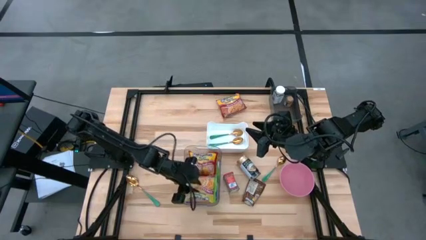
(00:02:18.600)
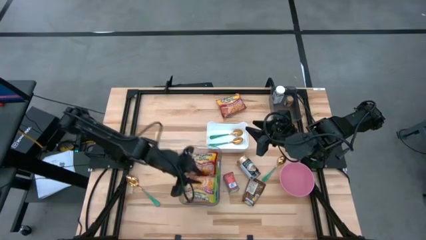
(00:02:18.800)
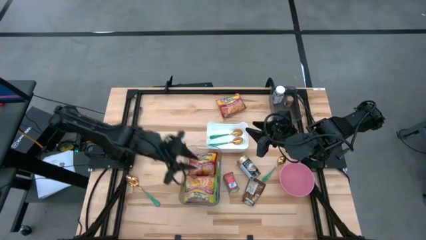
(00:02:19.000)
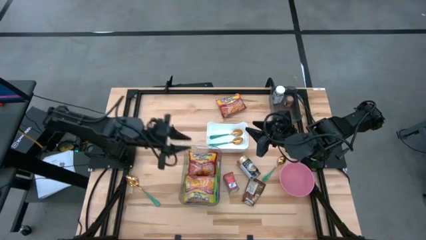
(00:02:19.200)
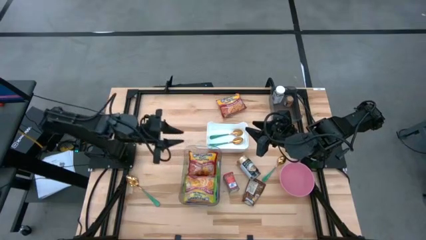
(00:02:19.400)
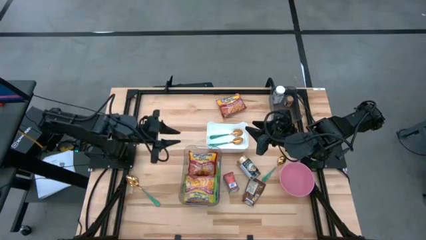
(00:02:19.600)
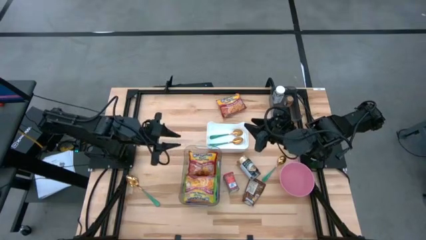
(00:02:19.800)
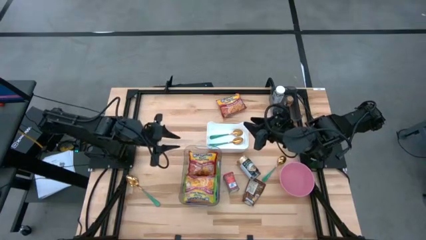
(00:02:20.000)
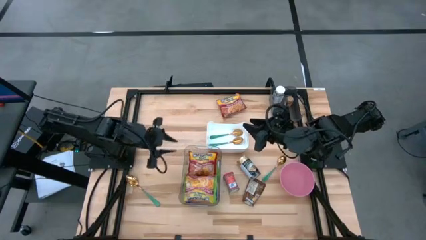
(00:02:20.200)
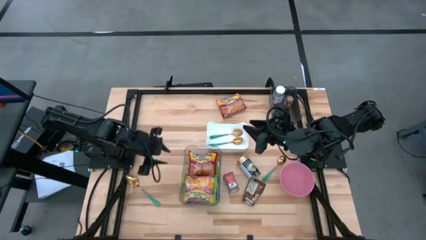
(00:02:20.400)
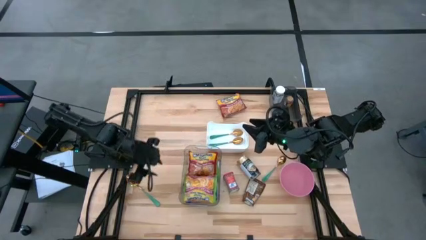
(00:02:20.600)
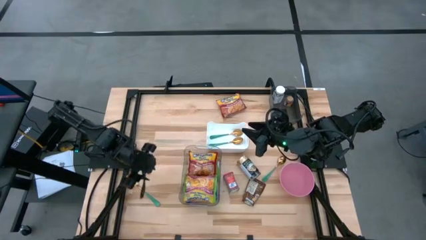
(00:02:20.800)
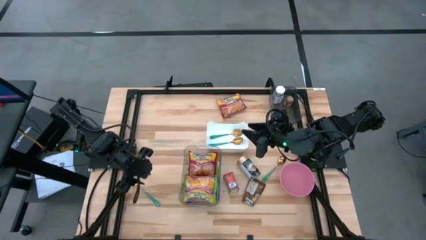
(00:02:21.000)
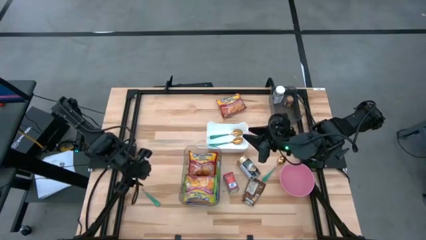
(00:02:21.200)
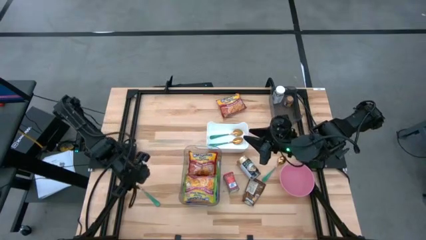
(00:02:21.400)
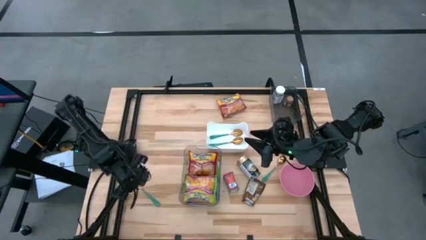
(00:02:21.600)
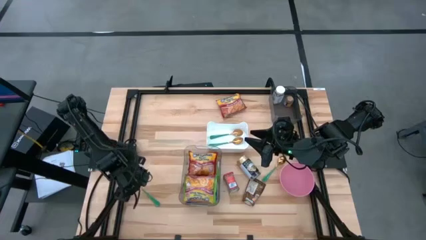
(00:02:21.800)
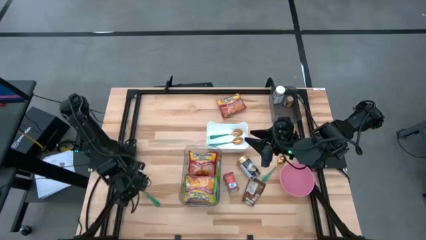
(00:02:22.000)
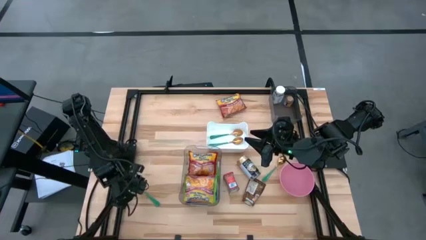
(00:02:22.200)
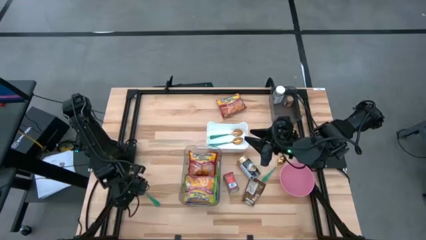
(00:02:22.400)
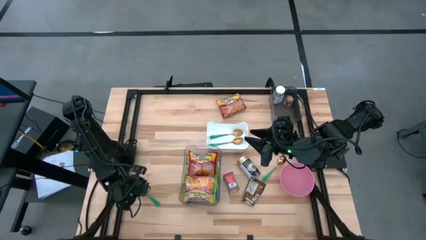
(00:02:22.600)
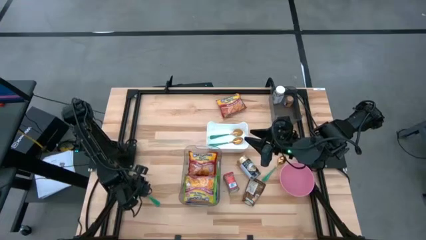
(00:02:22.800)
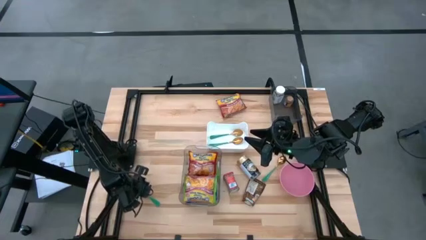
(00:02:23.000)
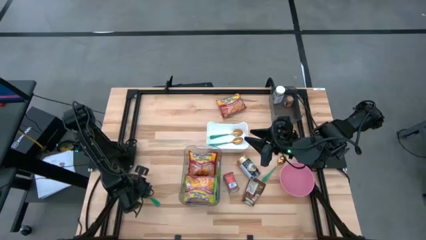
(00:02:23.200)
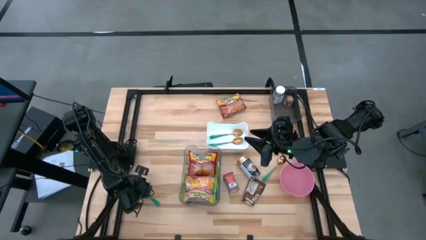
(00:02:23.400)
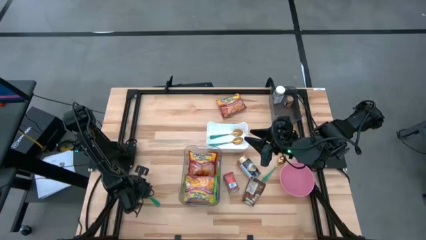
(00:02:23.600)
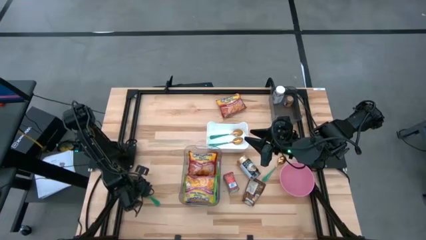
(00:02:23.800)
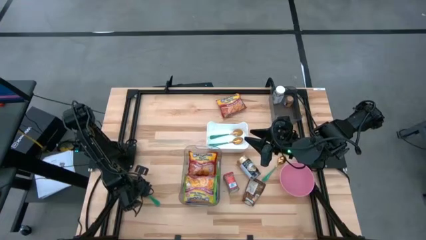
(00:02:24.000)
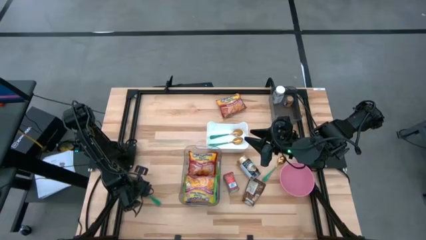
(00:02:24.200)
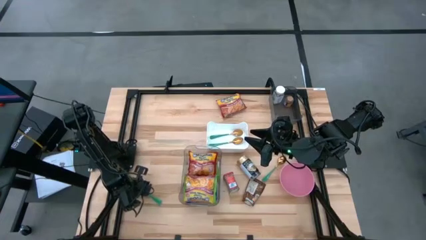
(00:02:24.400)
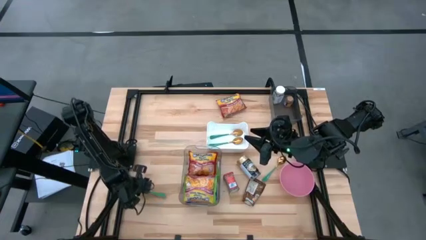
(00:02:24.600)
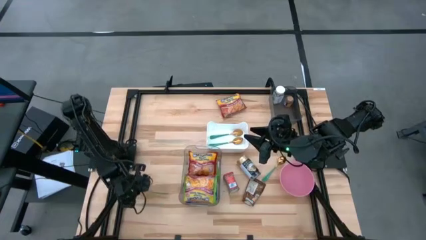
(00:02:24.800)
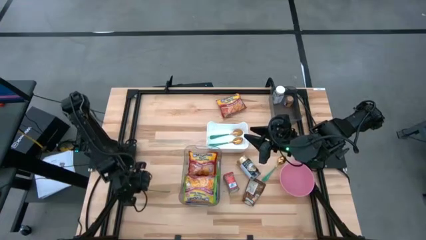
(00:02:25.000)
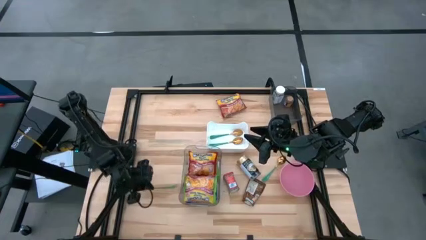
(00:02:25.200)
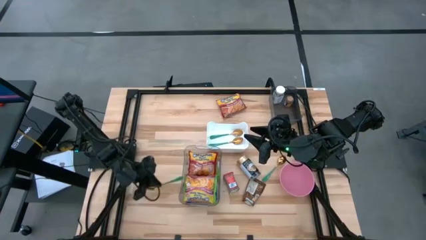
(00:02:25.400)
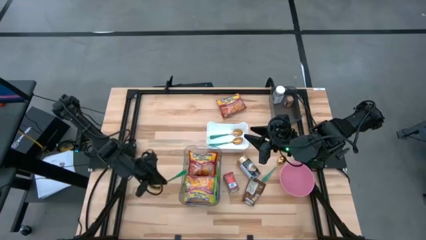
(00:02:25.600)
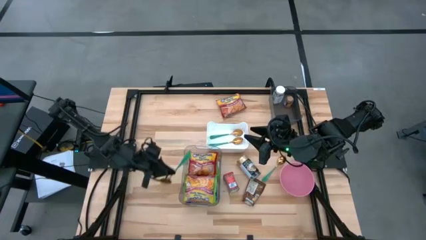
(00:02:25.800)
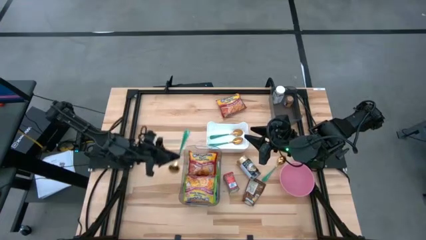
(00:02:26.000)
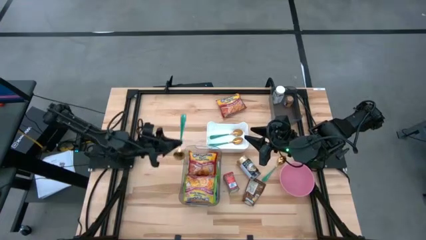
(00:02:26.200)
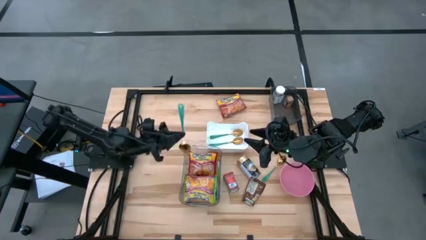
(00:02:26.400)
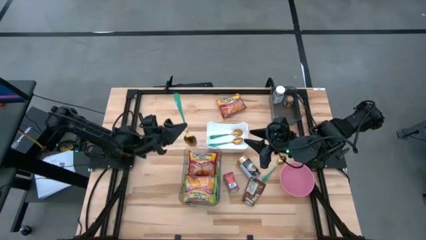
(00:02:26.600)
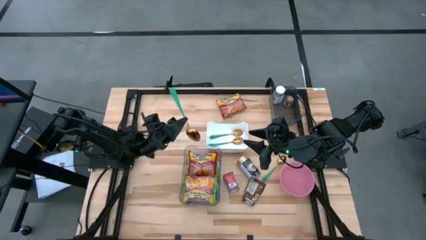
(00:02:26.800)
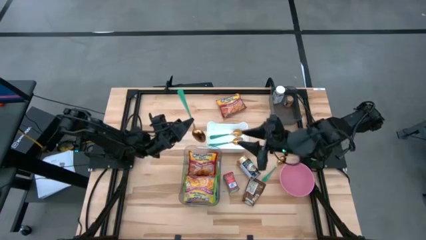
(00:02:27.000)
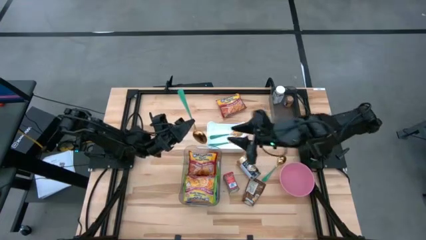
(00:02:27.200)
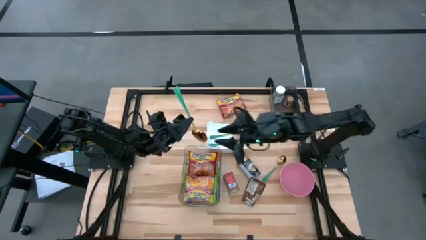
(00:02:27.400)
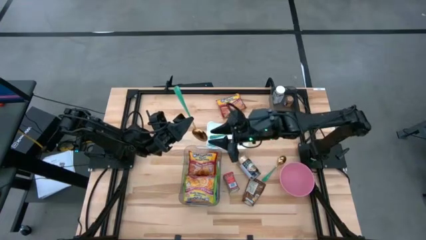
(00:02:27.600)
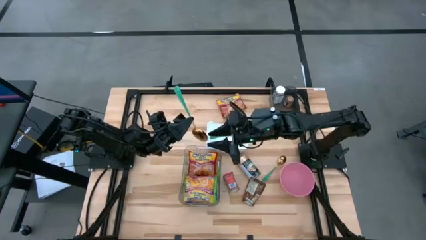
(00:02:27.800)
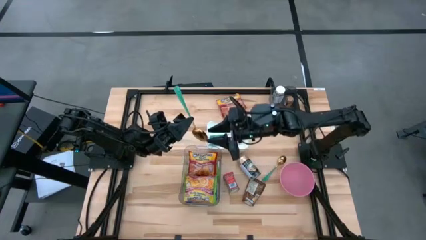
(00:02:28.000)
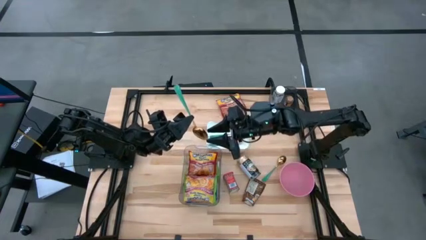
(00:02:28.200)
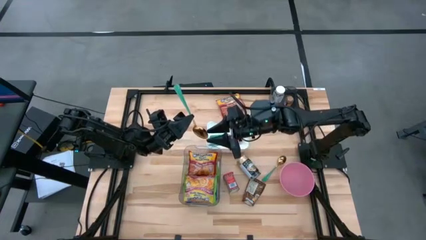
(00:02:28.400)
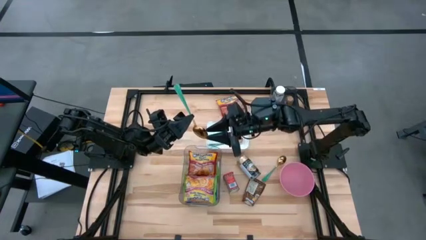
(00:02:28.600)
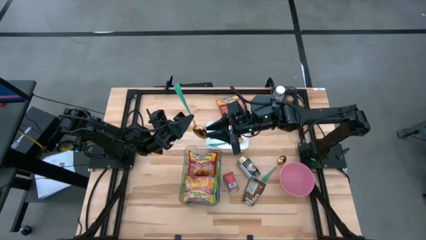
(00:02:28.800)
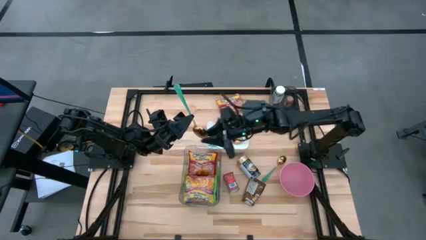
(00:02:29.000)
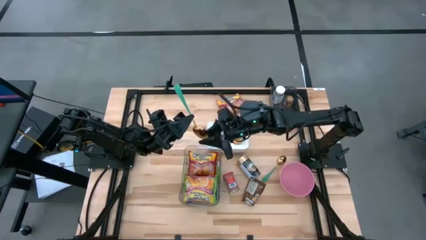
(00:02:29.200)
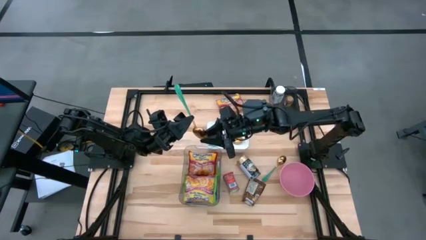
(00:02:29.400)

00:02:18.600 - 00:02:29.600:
Task: Pick & Place Food Item
Put the green spoon into the white bin
